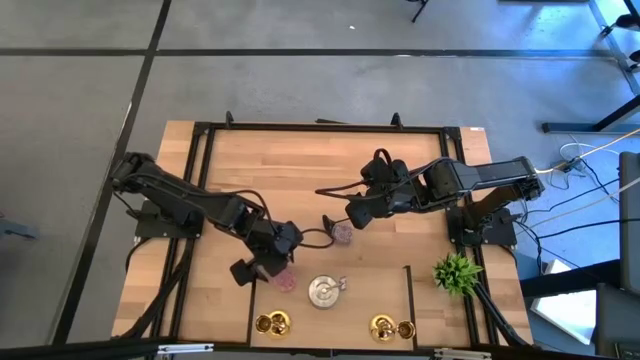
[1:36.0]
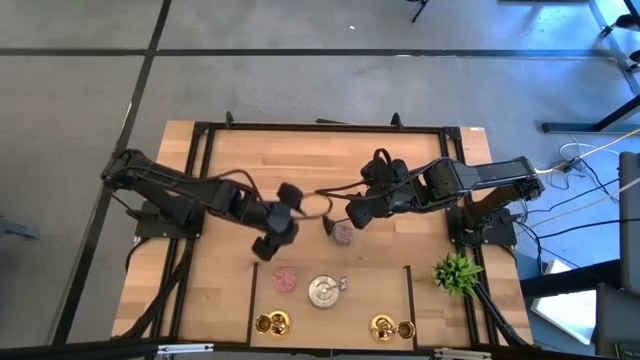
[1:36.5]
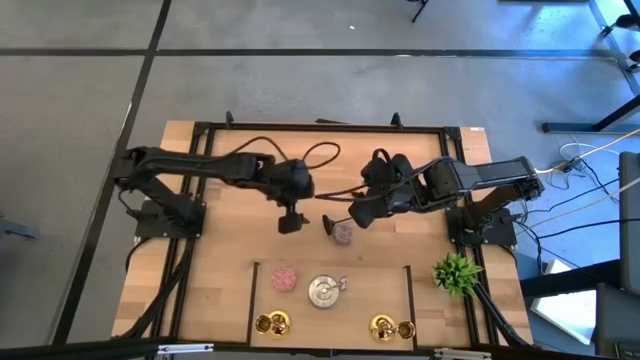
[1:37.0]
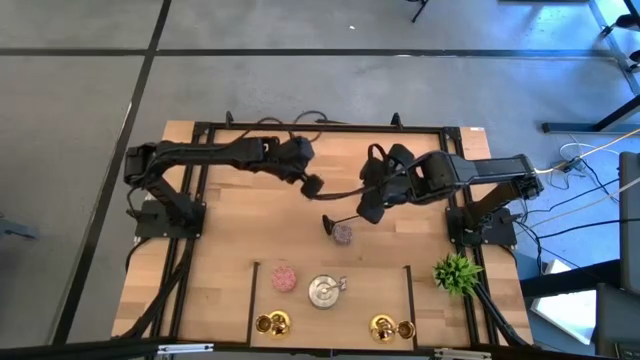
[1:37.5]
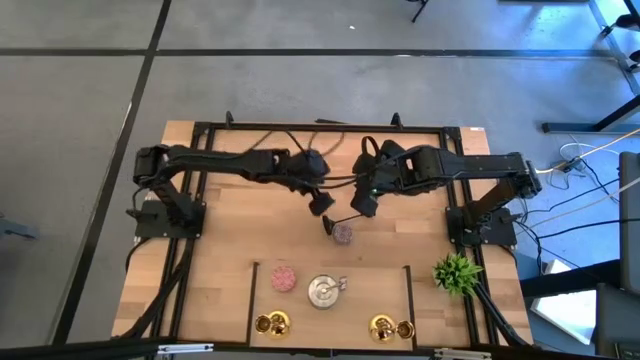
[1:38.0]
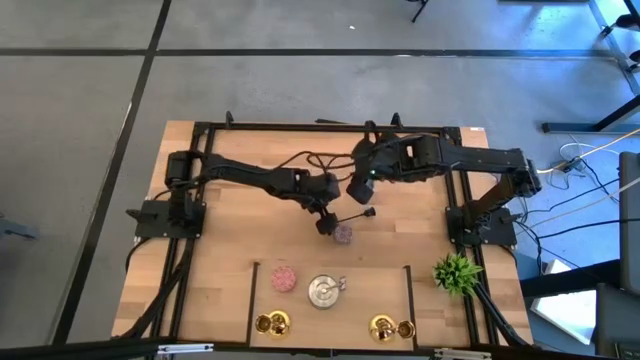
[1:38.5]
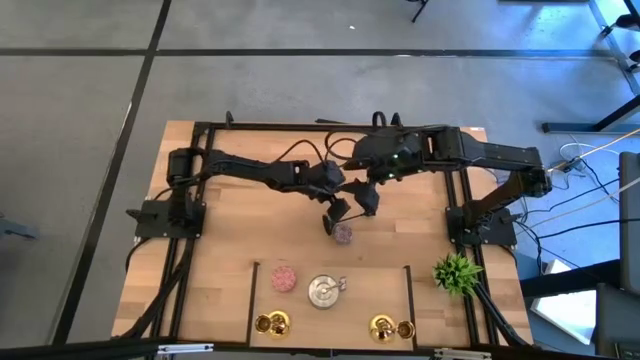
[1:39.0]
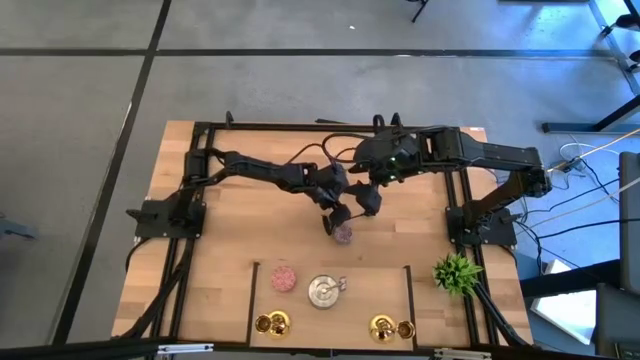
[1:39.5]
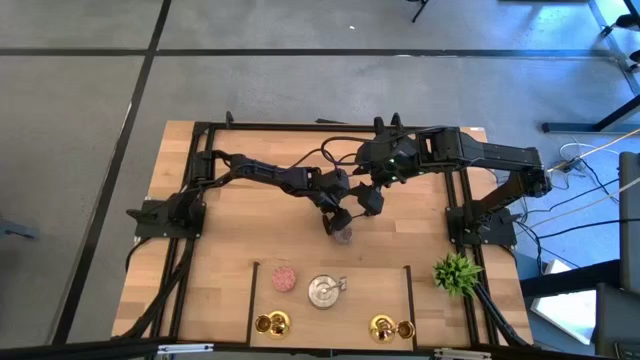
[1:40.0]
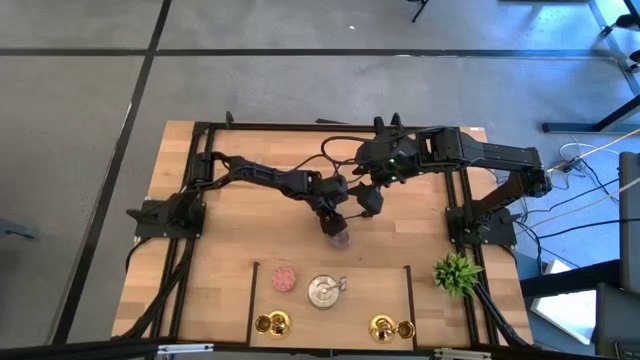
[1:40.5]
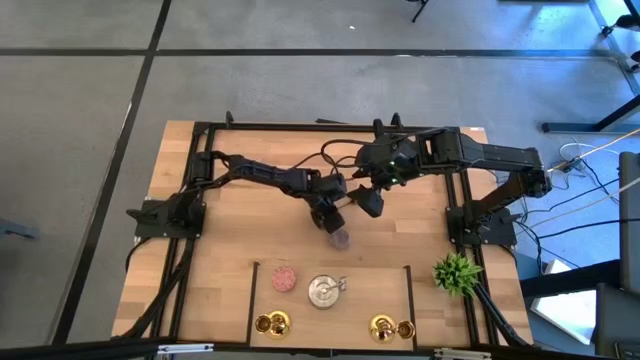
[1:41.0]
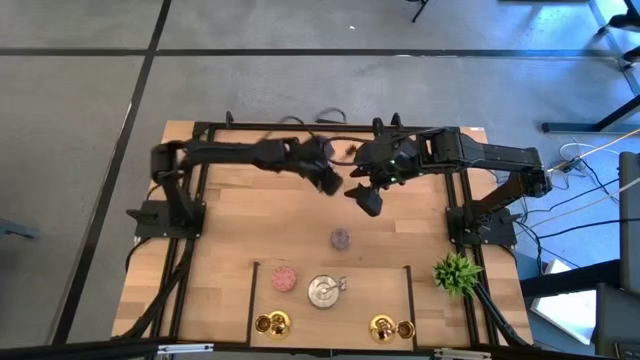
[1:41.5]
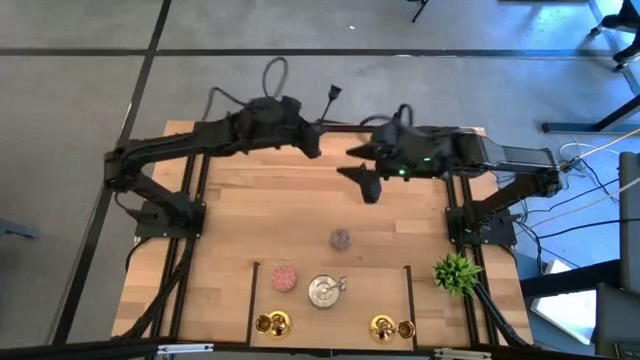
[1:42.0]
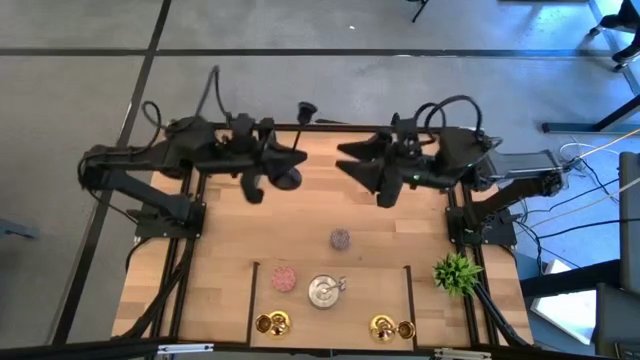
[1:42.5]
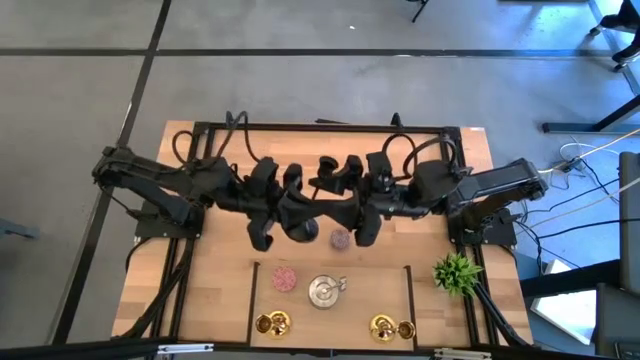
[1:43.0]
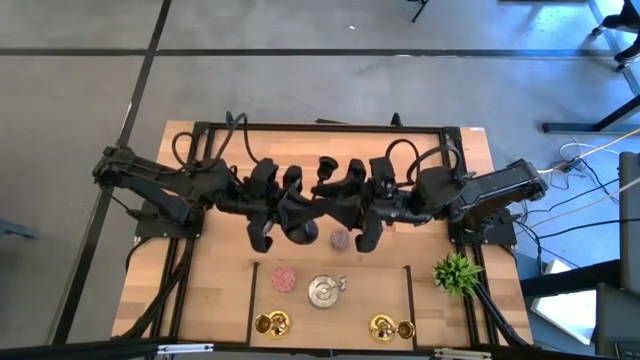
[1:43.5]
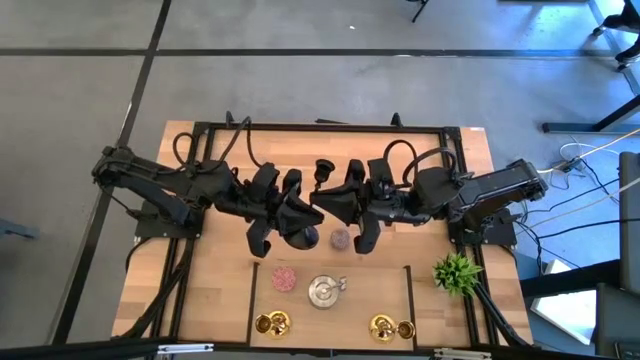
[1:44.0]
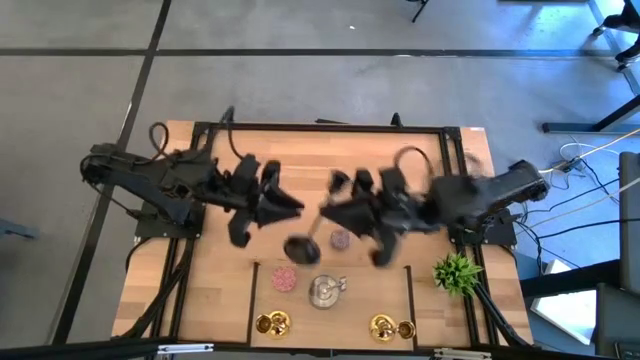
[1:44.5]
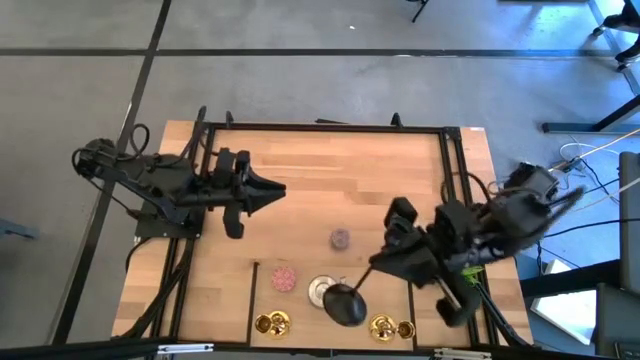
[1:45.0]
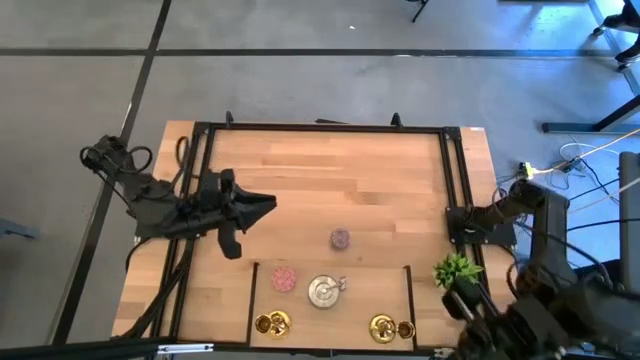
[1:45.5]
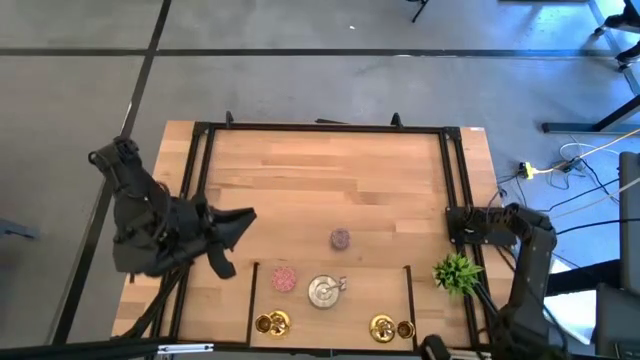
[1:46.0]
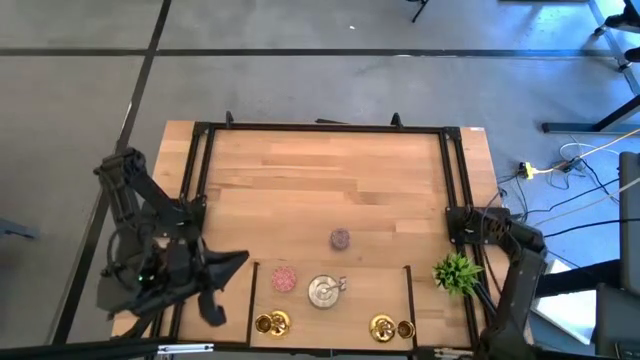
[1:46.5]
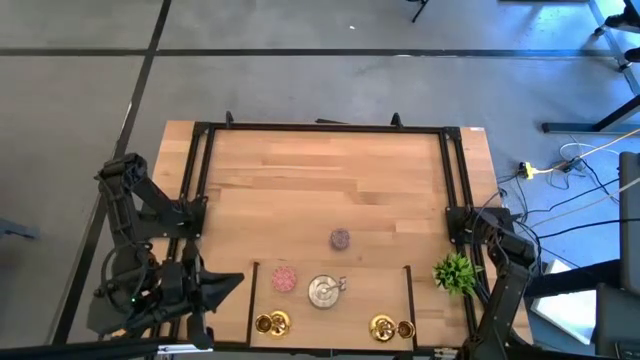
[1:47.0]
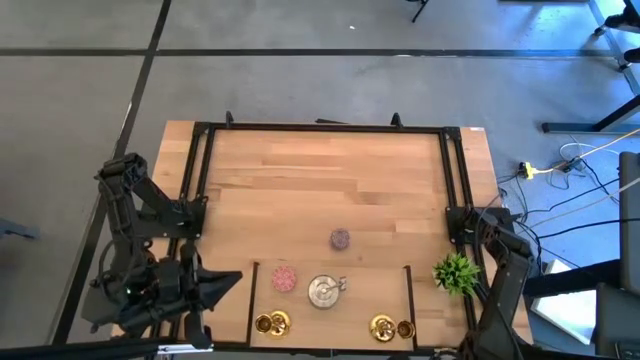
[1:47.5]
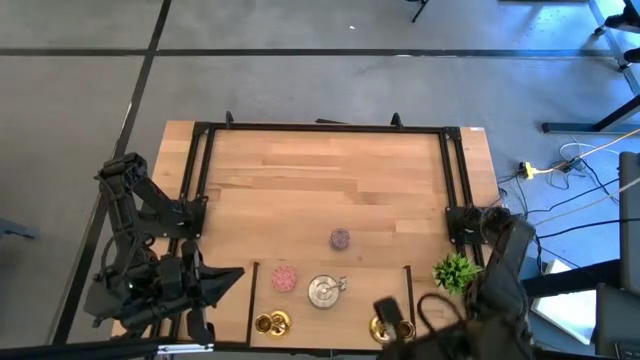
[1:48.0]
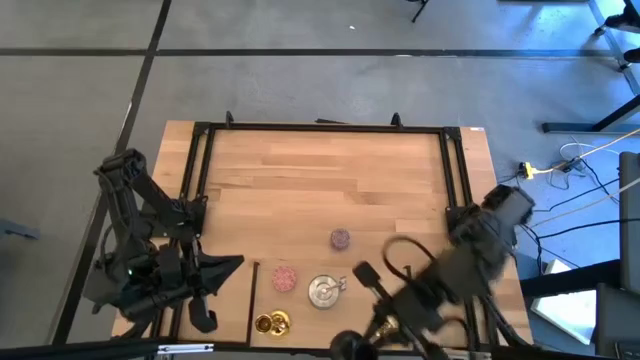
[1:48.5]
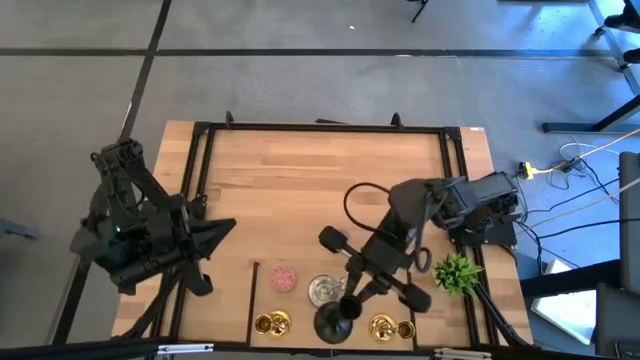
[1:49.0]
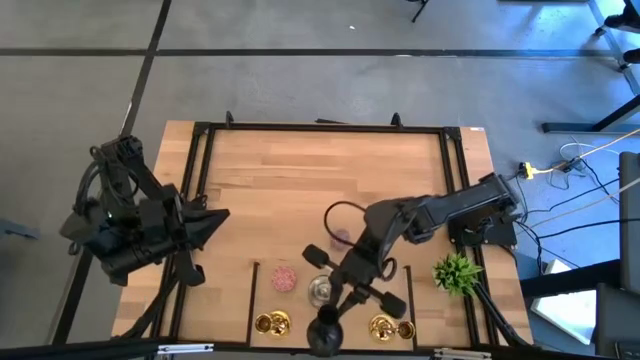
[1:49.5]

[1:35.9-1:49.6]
Task: Pick & Place candle stick holders
Put the black candle holder on the shelf

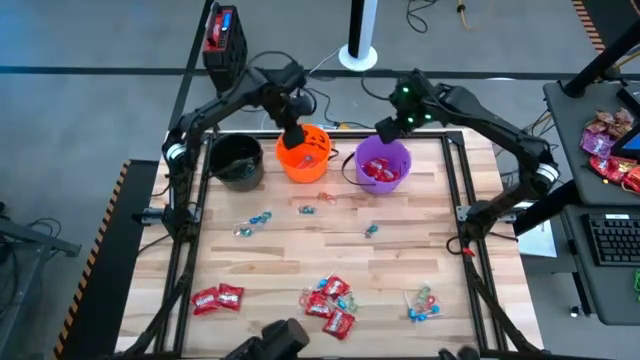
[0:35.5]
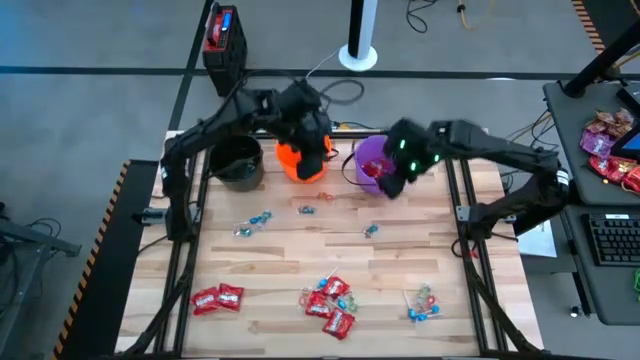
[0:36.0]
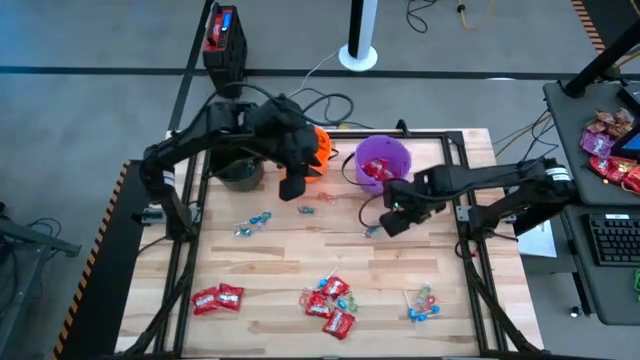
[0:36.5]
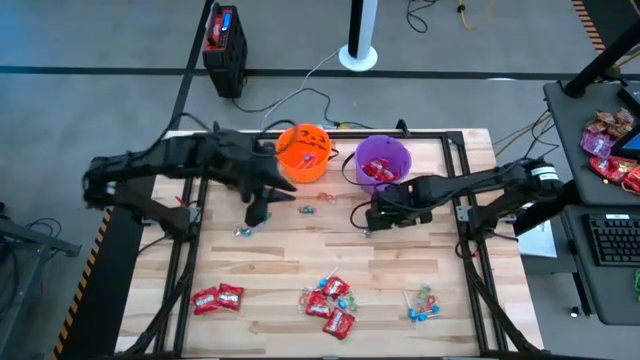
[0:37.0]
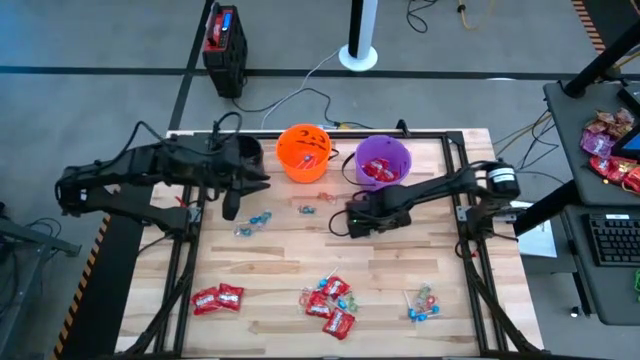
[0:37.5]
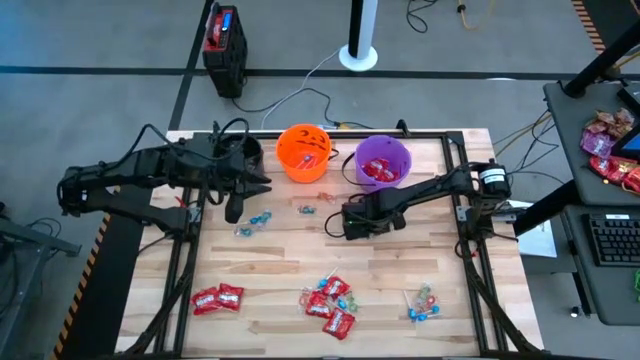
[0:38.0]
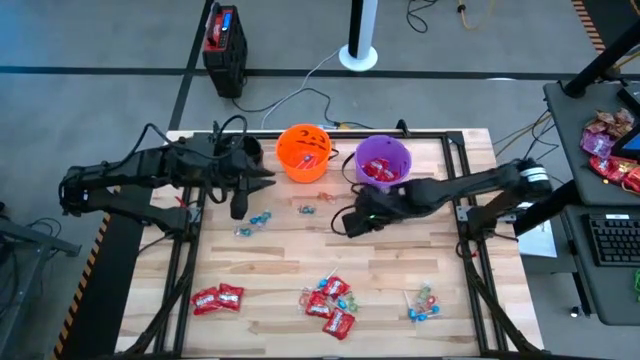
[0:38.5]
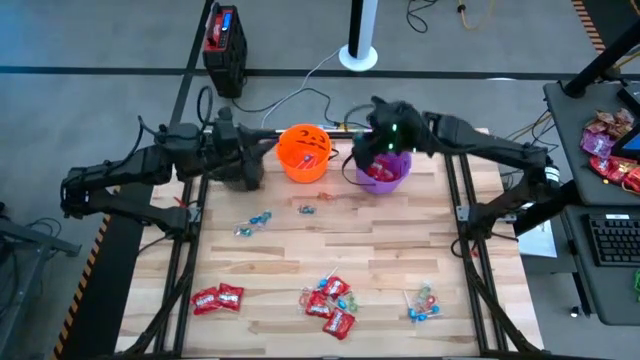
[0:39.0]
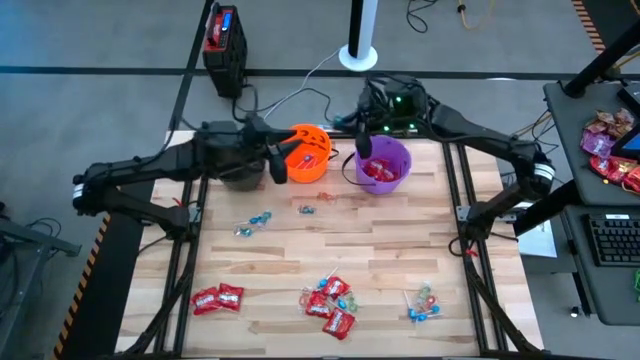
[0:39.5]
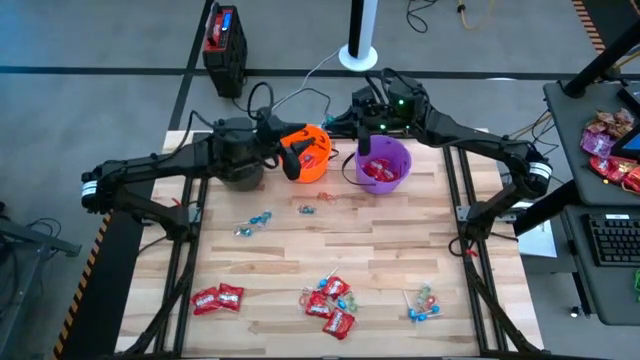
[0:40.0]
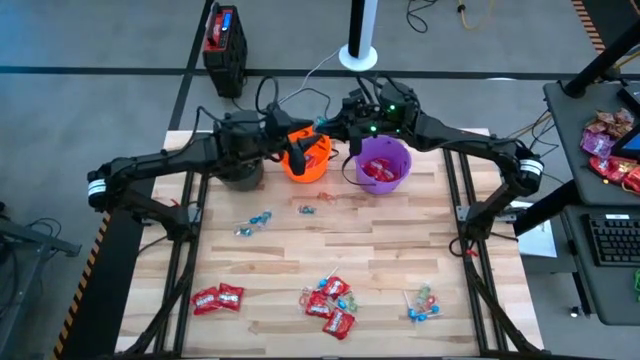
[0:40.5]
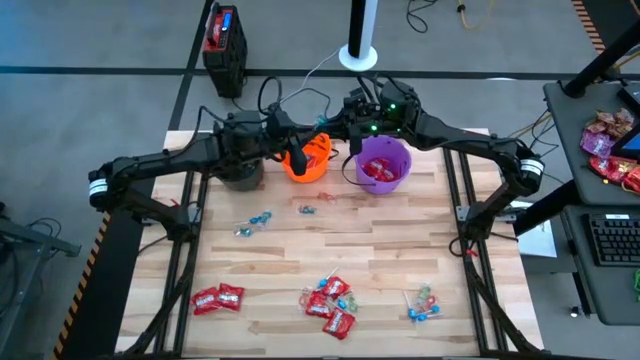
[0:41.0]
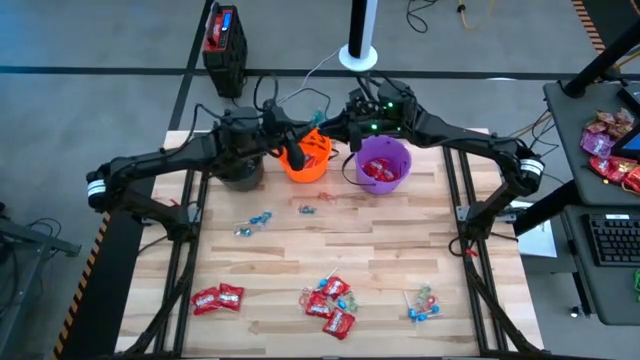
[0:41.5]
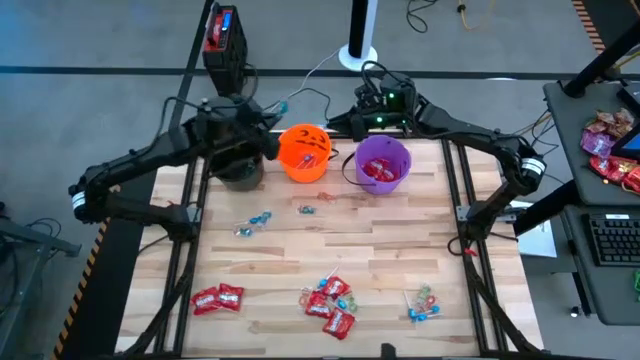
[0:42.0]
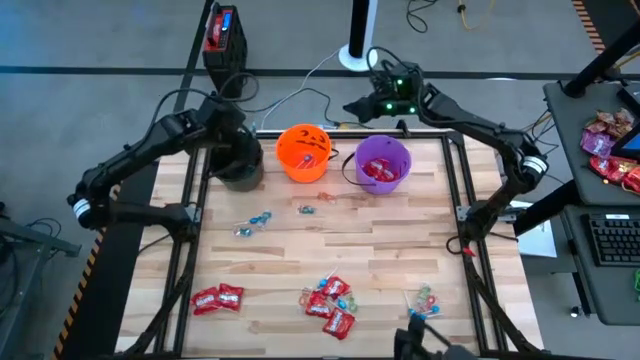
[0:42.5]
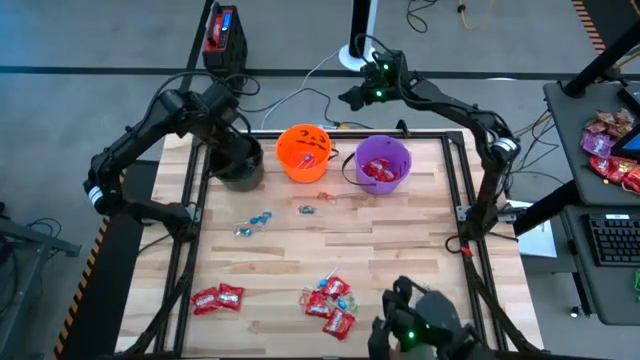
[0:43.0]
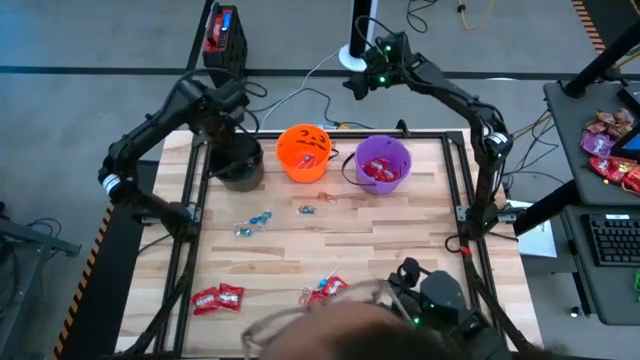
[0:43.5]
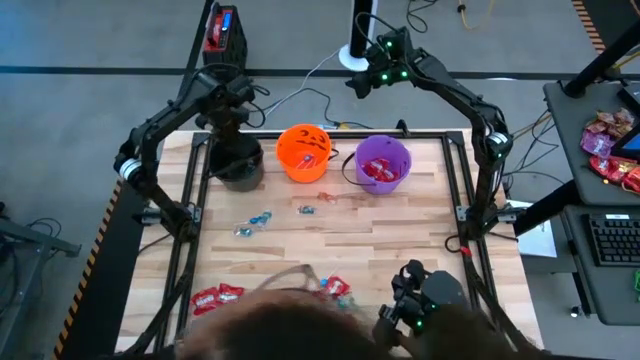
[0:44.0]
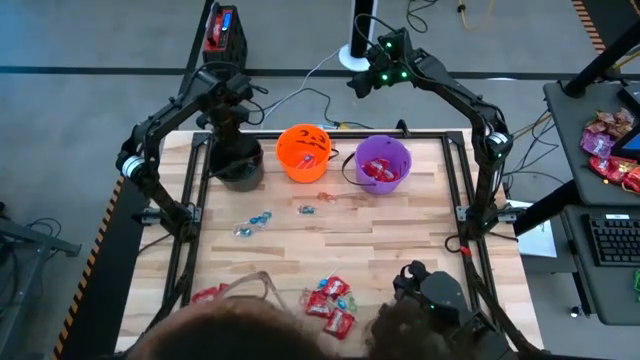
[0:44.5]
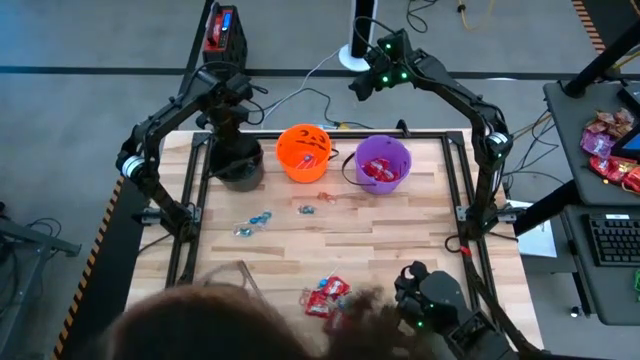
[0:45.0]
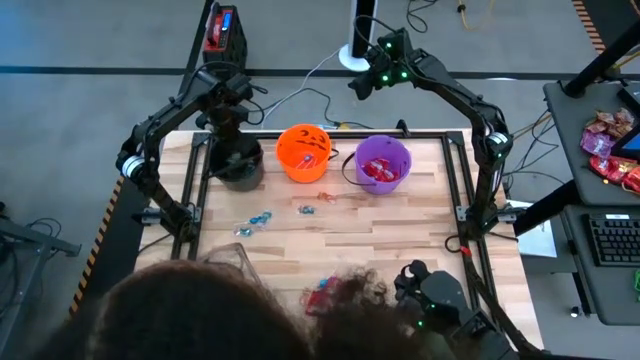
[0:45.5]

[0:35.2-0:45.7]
Task: Sort candy by brand, put in halloween buckets
Put the blue gummy into the black bucket
